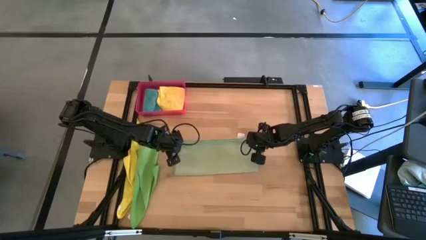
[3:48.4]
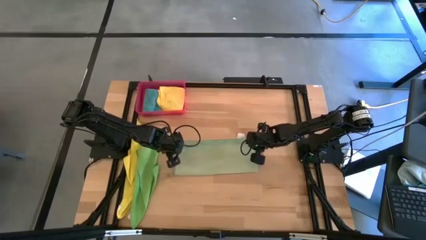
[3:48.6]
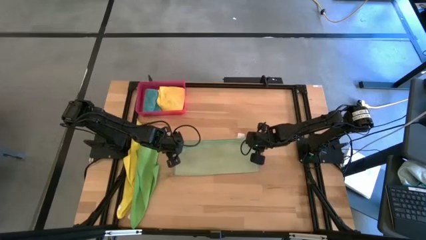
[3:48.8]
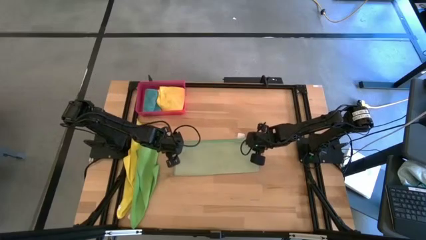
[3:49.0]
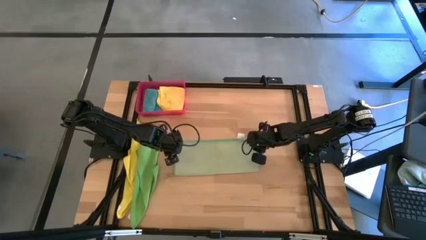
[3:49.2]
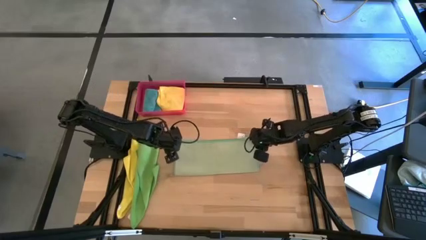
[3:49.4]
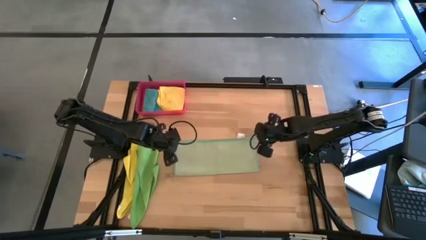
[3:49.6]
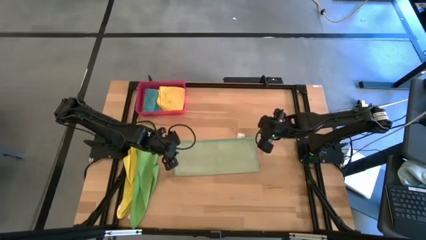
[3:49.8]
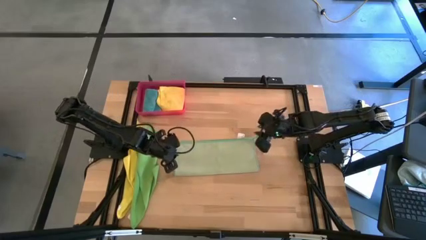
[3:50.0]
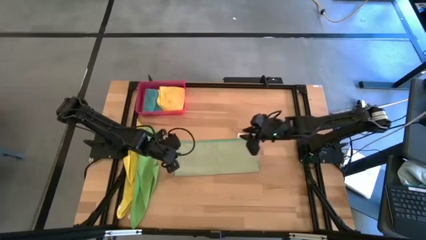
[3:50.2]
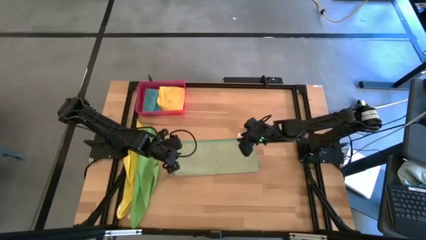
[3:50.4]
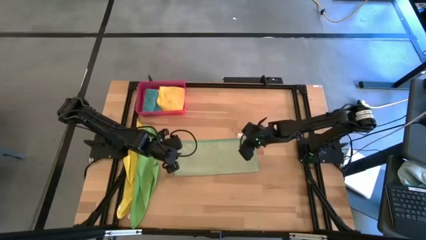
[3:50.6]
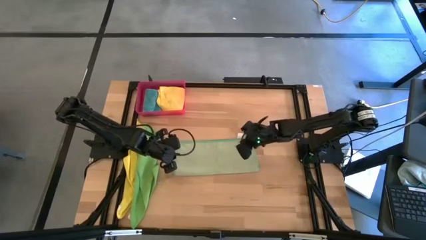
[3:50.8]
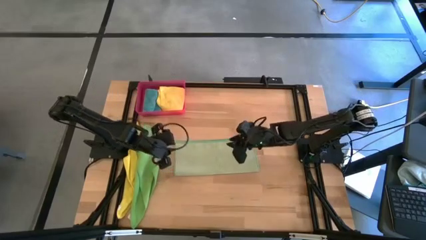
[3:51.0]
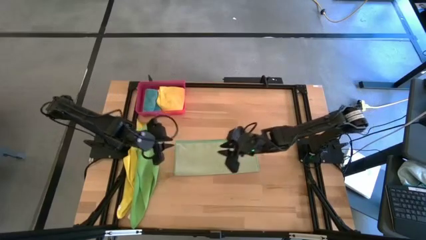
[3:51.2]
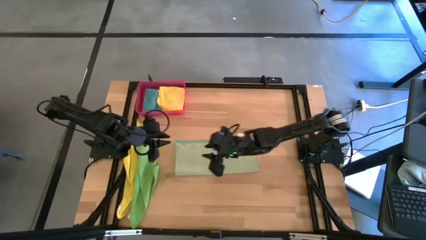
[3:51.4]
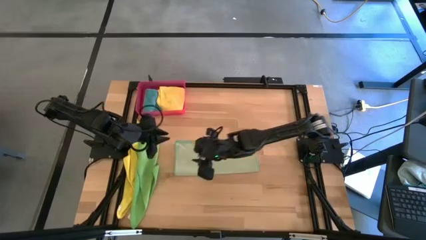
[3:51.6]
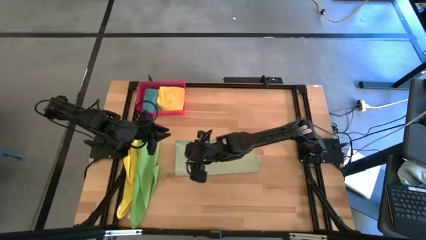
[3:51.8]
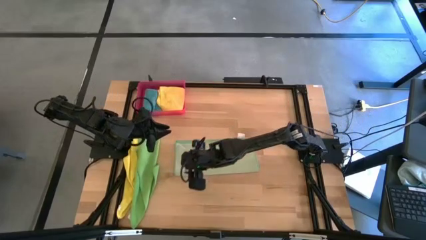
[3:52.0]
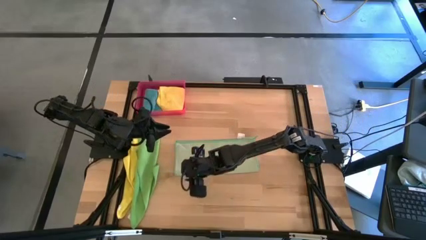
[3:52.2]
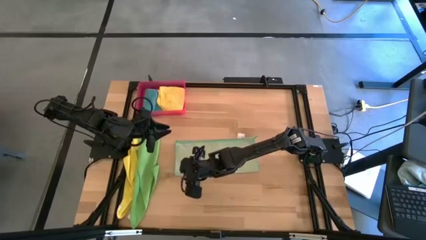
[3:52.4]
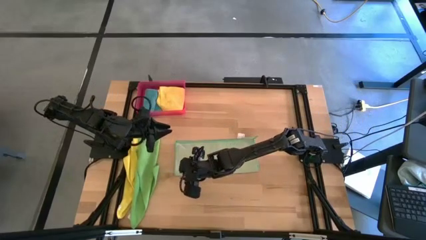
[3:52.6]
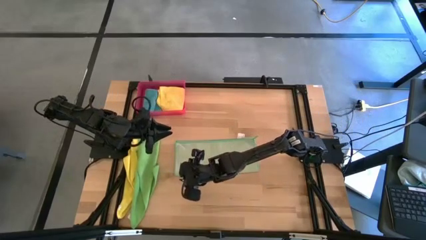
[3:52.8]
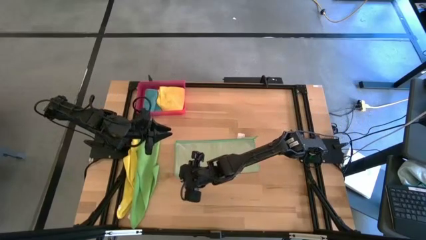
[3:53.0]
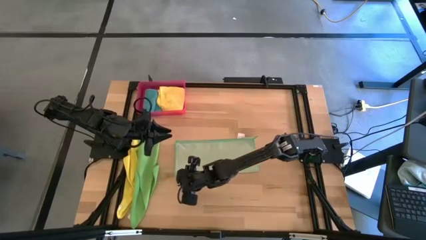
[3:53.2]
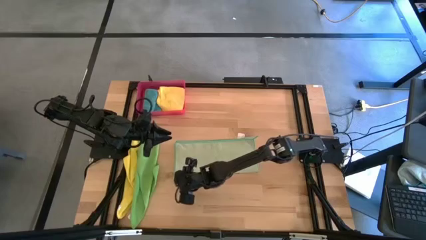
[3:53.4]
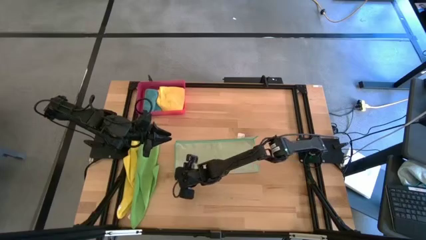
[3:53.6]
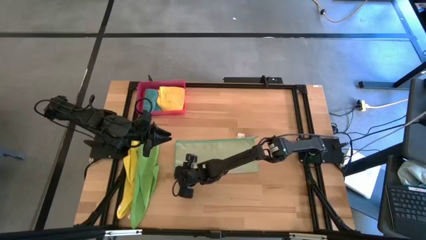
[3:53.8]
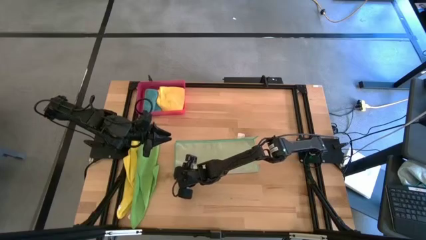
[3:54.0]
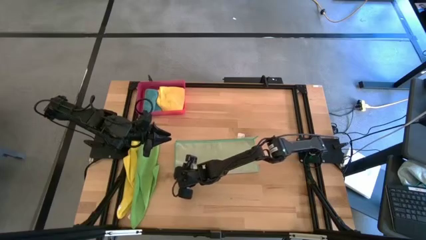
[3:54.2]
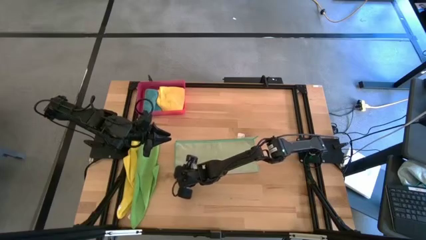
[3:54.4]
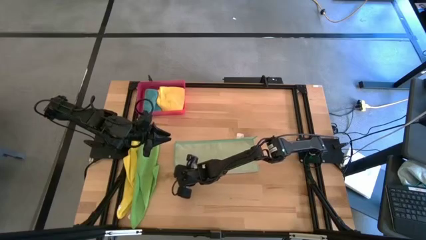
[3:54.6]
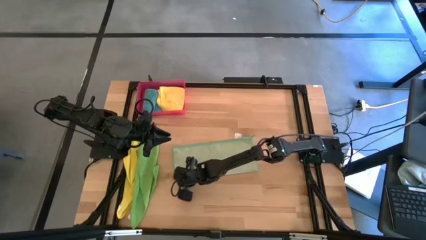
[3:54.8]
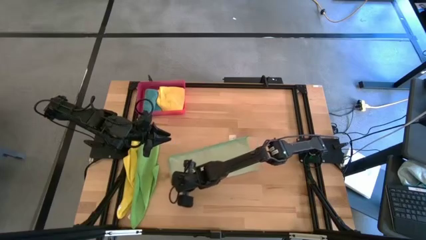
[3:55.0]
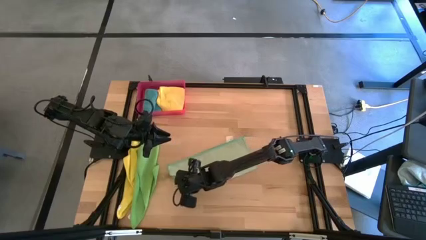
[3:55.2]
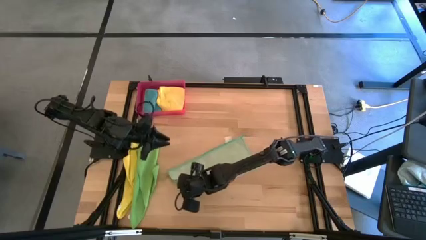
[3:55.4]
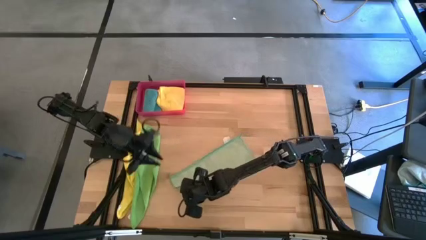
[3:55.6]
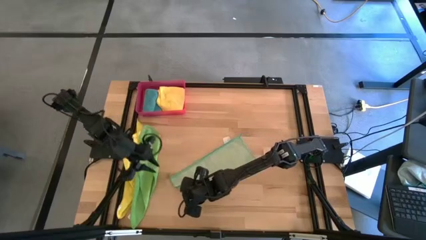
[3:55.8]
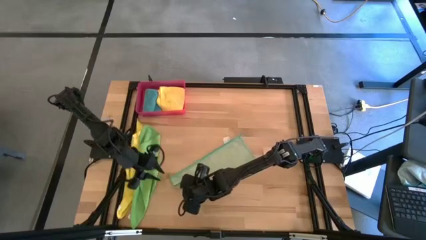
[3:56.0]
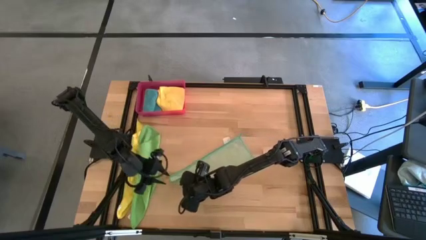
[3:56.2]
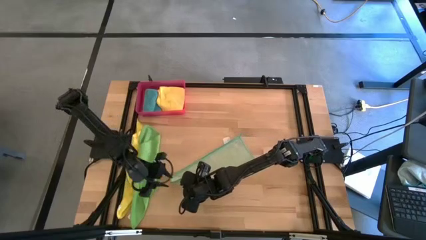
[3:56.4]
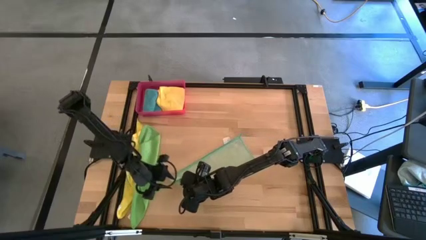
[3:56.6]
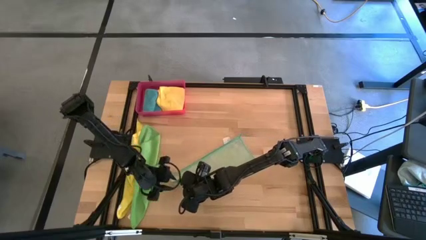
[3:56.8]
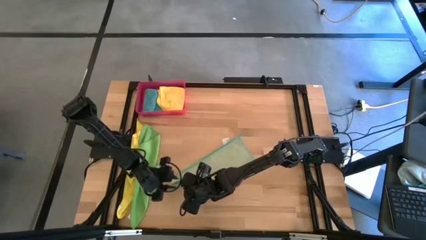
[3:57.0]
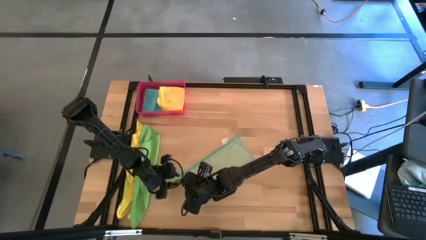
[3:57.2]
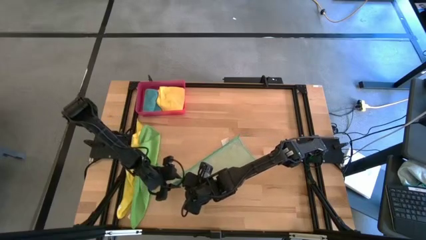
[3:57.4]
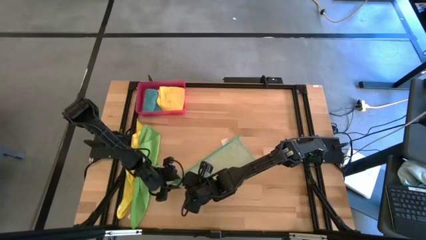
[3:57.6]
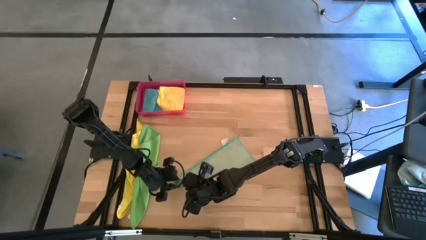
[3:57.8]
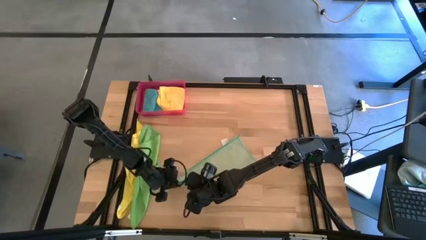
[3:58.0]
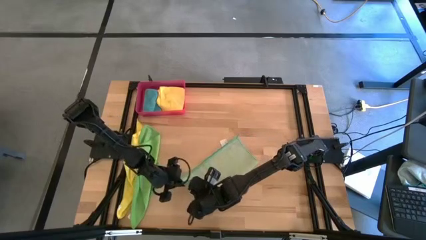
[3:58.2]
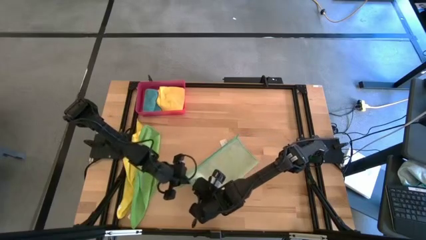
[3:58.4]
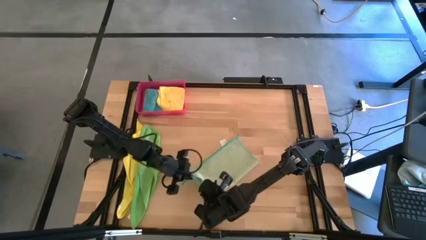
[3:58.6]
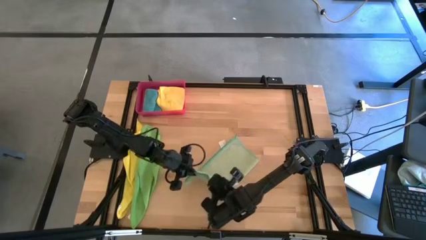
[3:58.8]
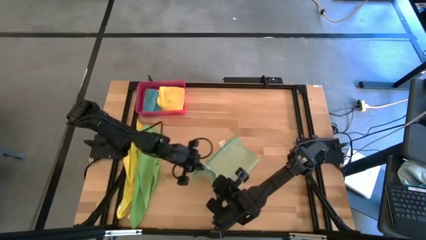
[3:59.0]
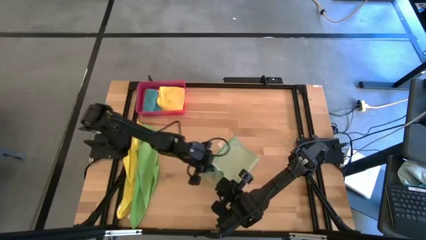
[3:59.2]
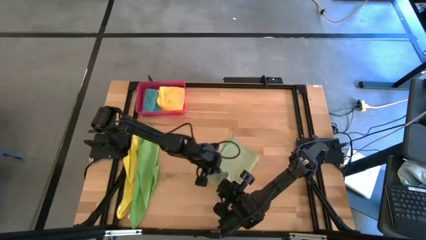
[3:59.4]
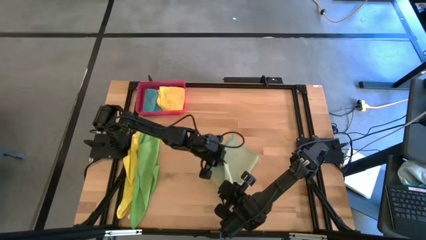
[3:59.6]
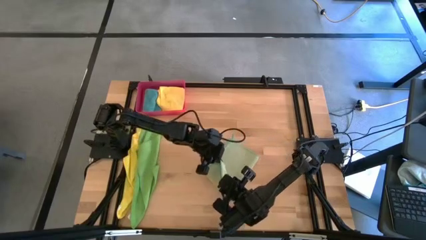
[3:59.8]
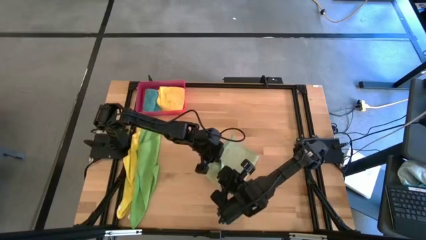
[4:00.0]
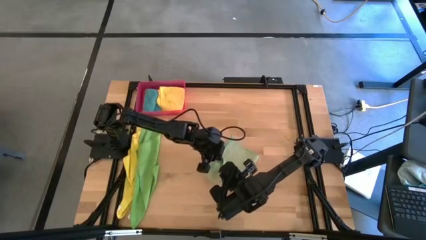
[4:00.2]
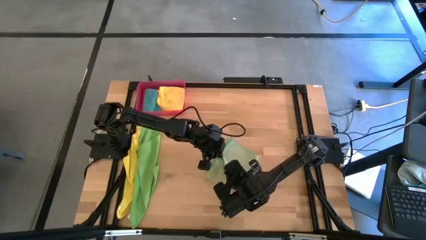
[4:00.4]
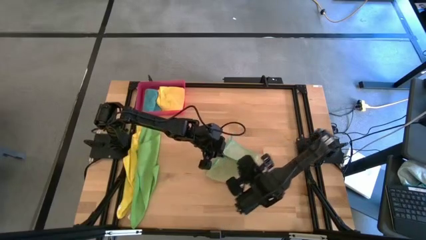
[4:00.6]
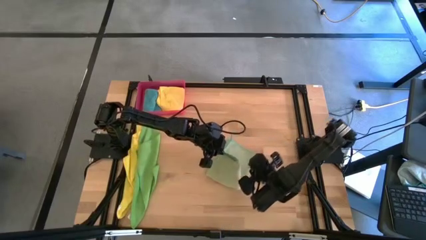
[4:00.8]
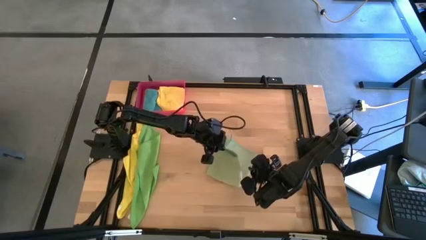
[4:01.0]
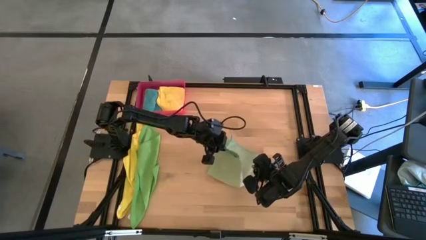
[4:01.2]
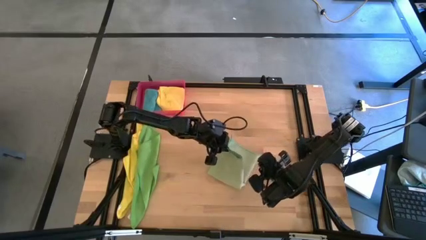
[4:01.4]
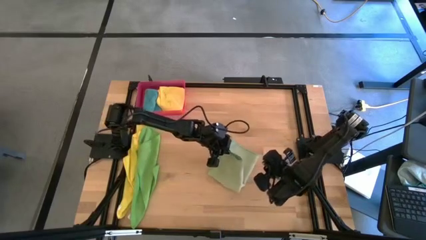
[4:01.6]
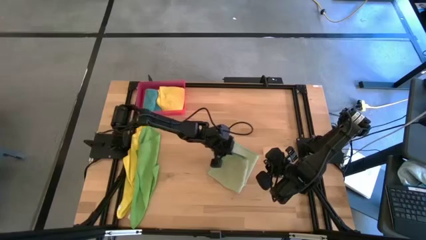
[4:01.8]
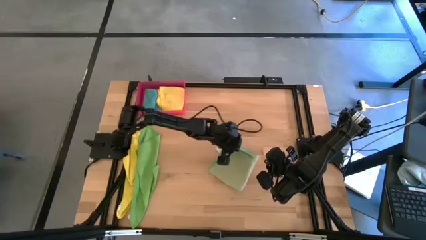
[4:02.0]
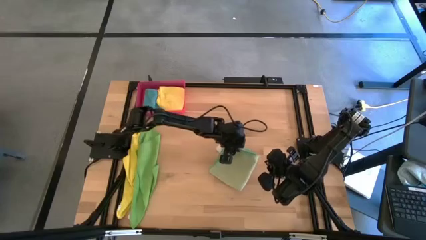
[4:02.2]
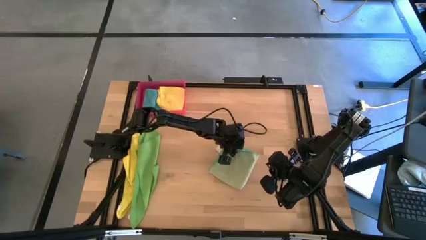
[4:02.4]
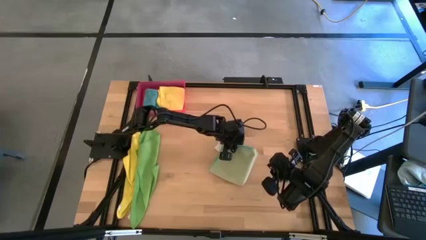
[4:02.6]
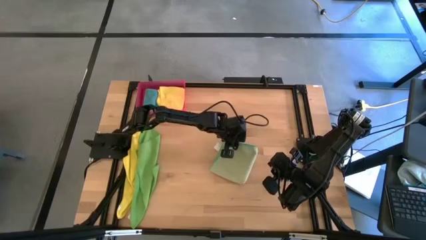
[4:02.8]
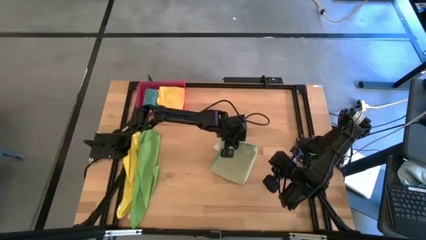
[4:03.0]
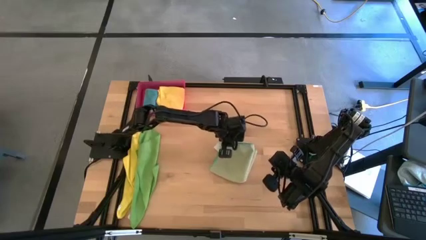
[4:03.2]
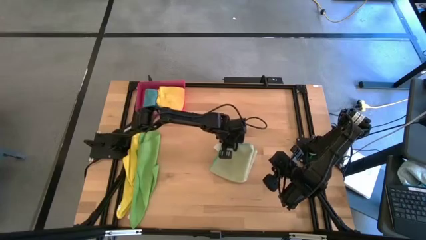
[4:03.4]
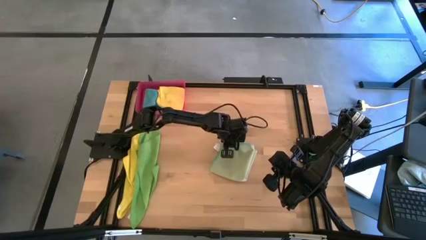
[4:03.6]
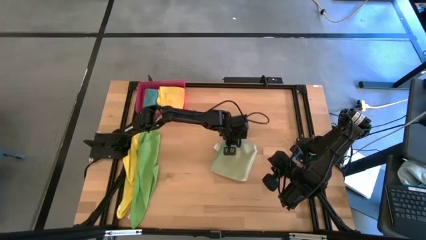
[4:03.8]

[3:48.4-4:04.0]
Task: Fold microfiber towels
Fold the light green microfiber towel
